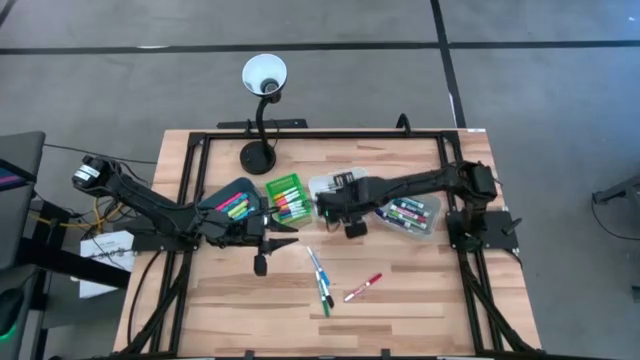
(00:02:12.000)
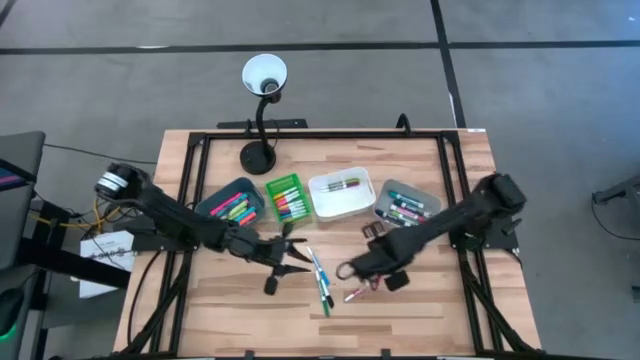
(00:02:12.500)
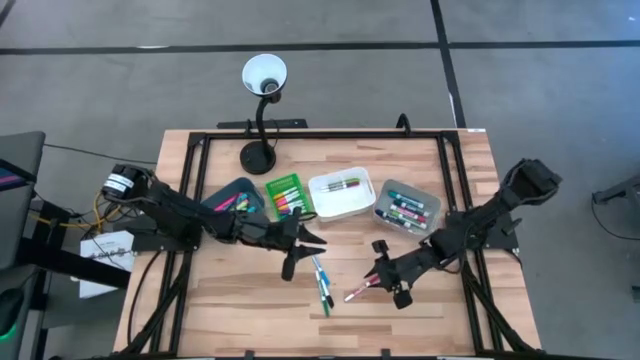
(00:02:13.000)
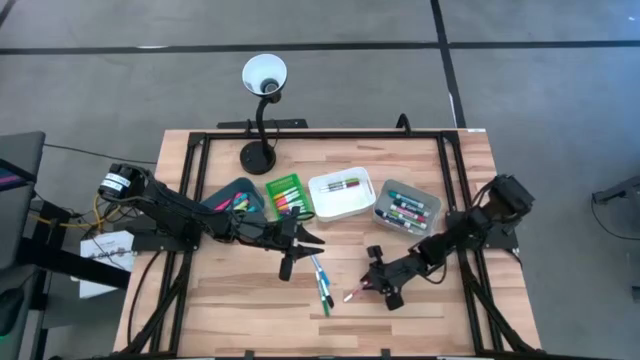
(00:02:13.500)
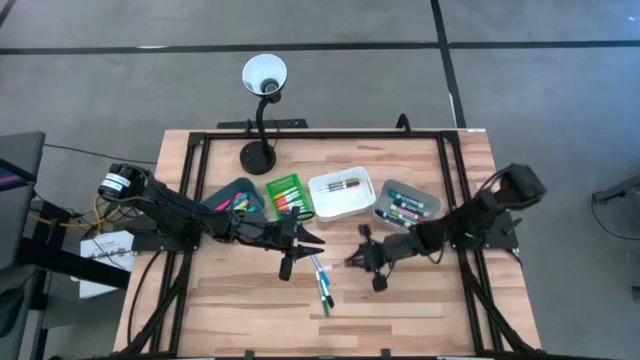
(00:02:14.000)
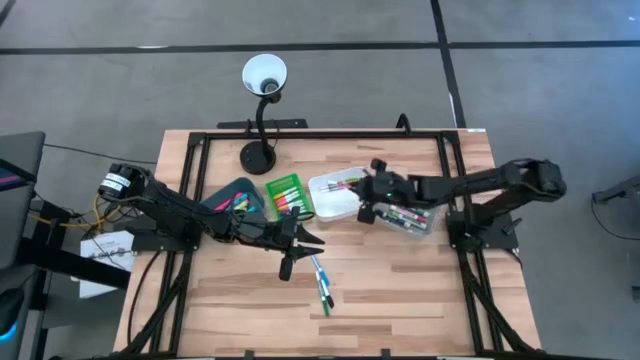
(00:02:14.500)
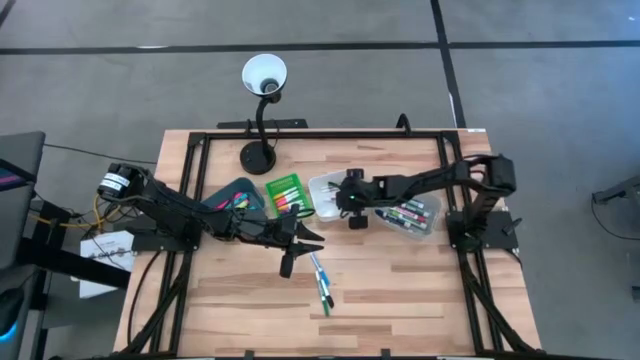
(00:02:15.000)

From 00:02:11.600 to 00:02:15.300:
Task: Pick & Place Markers
Put the red marker pen into the white bin

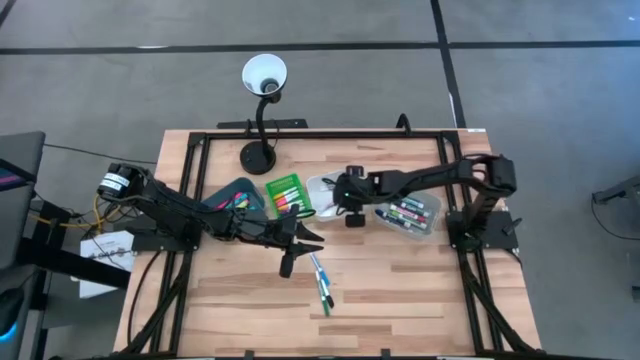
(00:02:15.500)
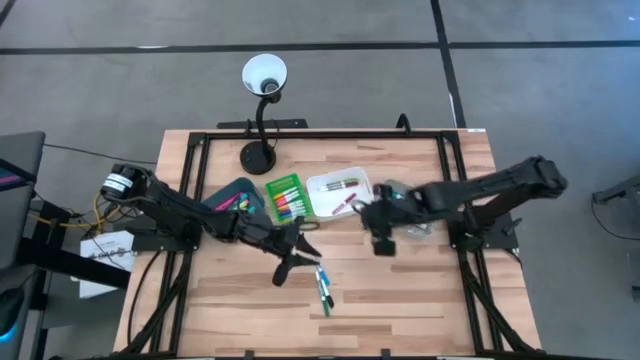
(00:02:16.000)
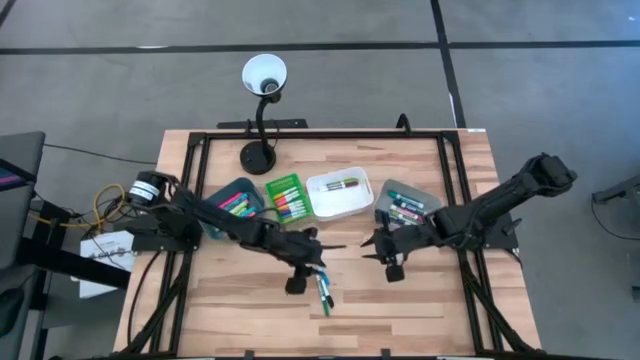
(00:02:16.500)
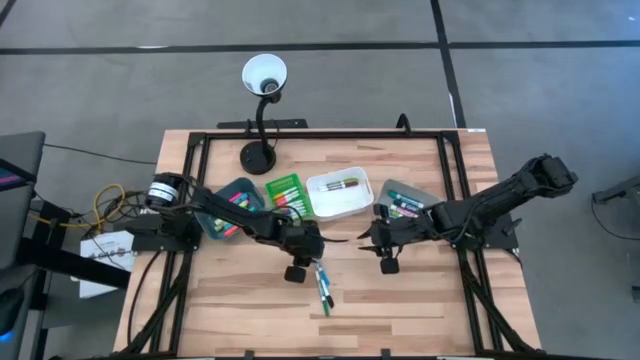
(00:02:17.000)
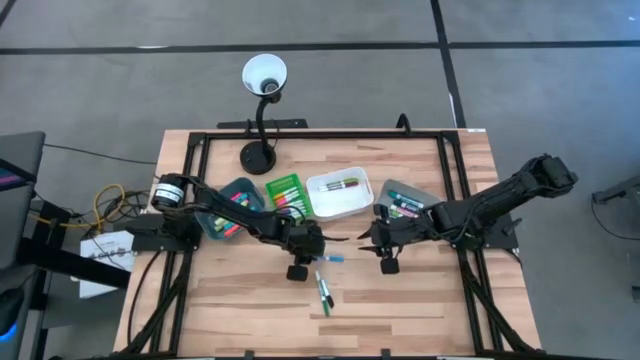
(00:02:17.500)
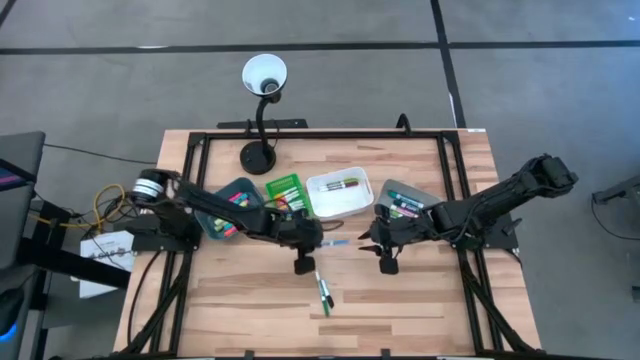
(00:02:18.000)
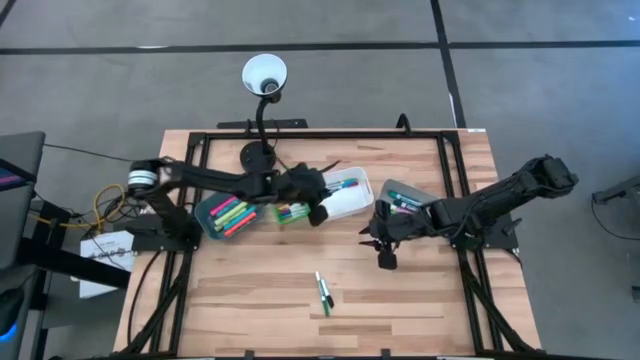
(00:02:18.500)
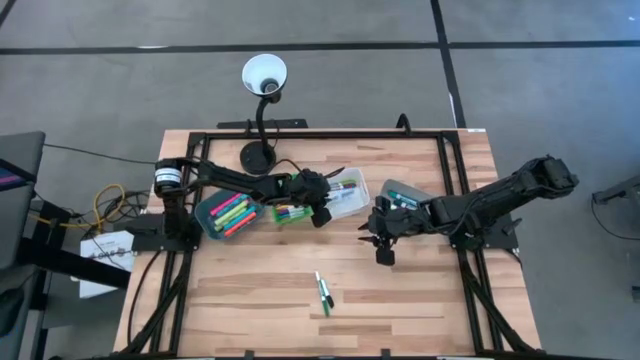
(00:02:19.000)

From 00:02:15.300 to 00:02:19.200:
Put the blue marker pen into the white bin

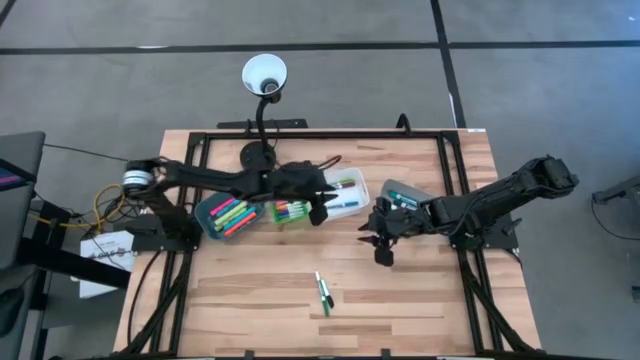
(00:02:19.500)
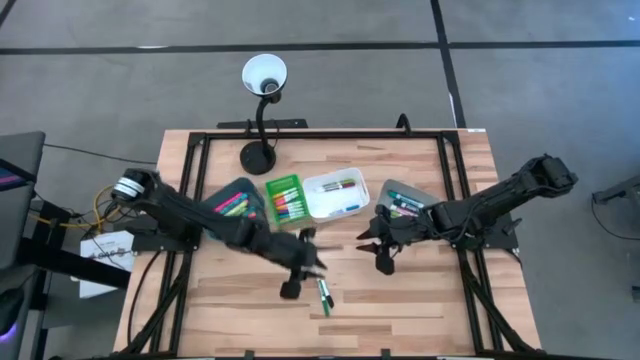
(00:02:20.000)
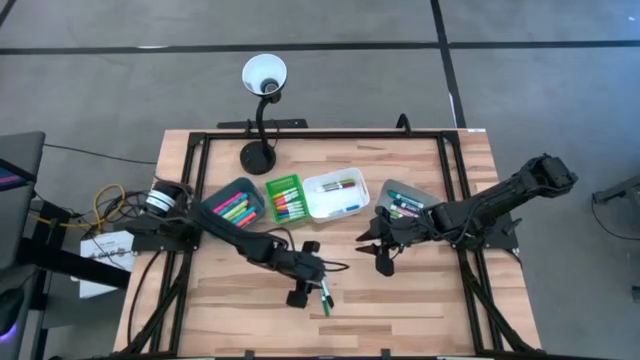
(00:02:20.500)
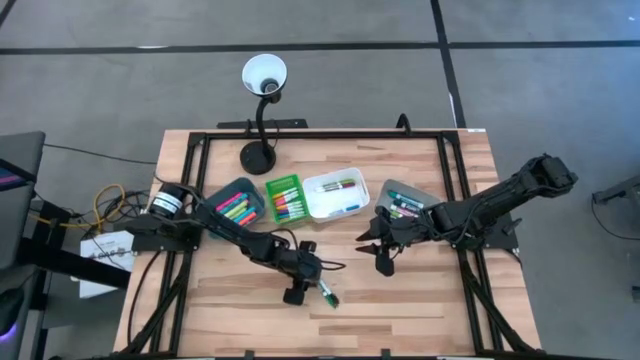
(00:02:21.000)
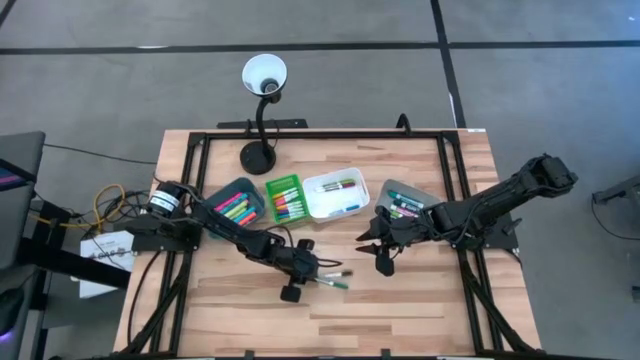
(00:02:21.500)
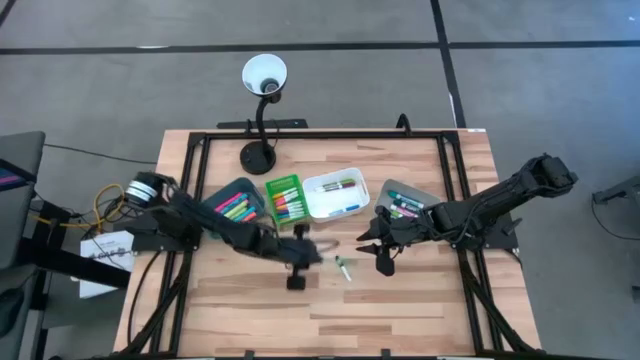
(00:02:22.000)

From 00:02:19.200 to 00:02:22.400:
Put the dark green marker pen into the white bin

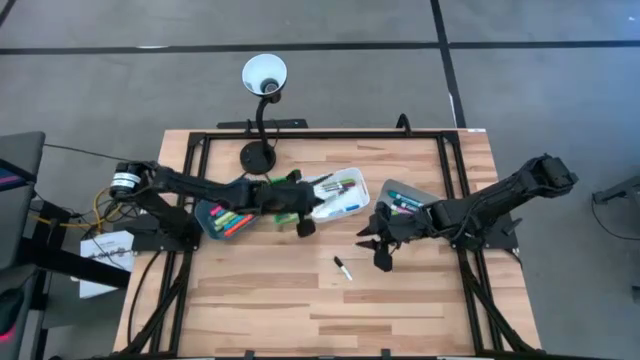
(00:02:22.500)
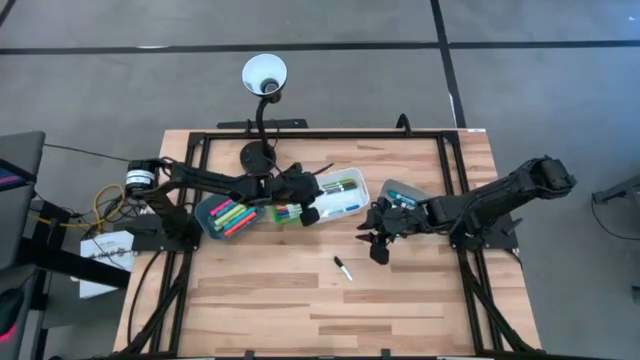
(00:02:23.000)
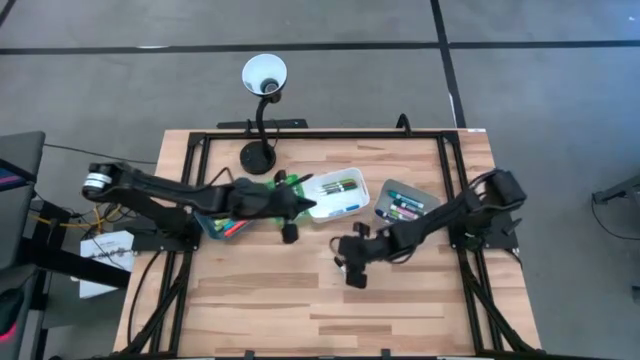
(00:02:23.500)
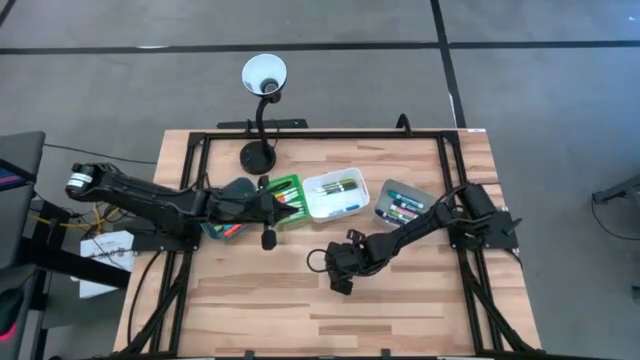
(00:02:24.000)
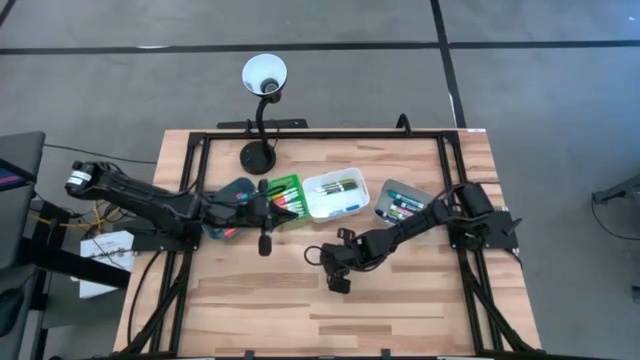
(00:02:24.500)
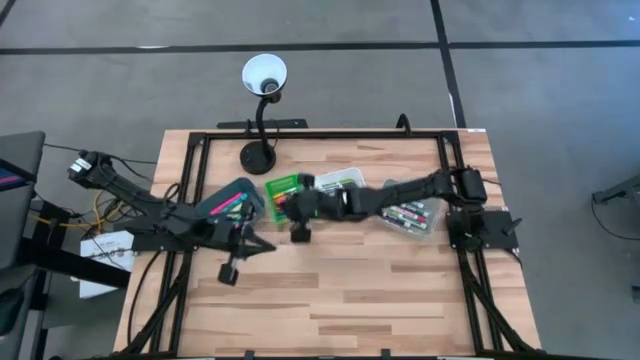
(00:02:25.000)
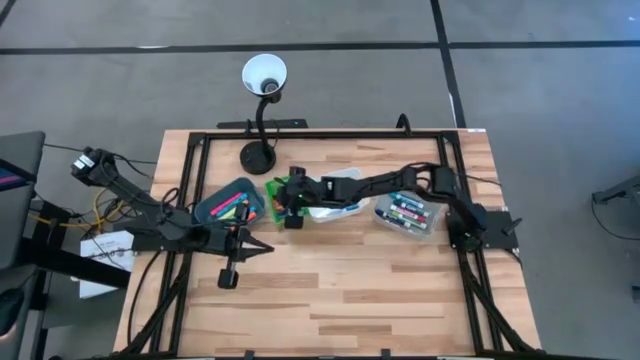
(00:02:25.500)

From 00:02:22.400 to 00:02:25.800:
Put the black and white highlighter pen into the green bin

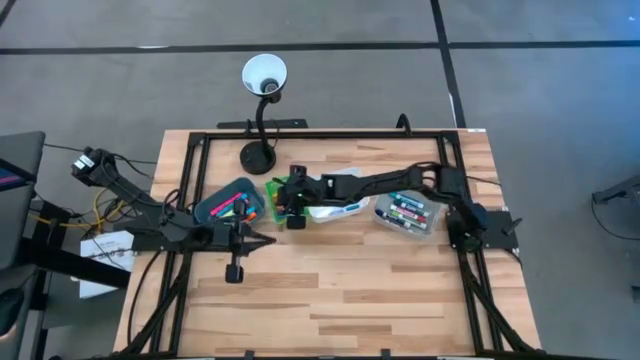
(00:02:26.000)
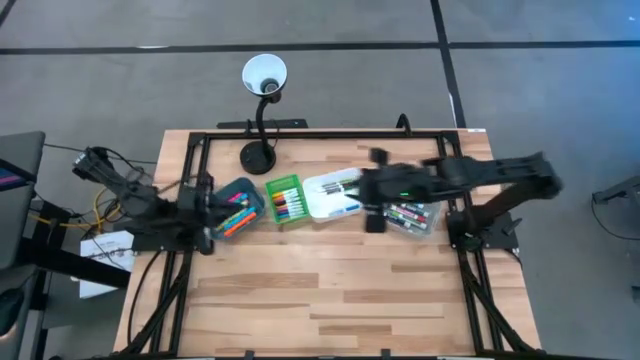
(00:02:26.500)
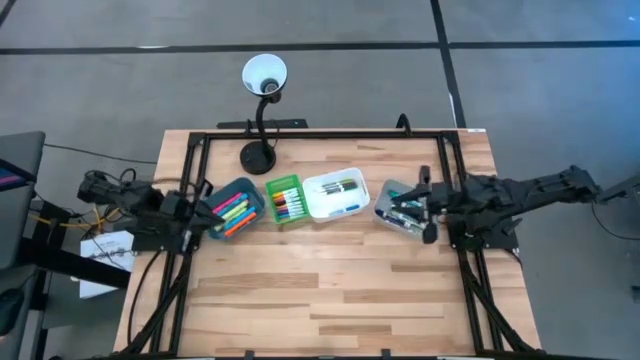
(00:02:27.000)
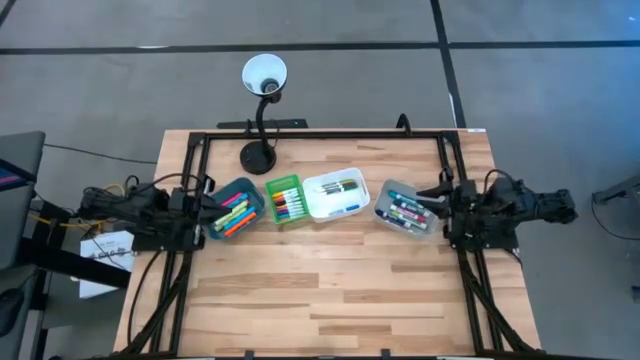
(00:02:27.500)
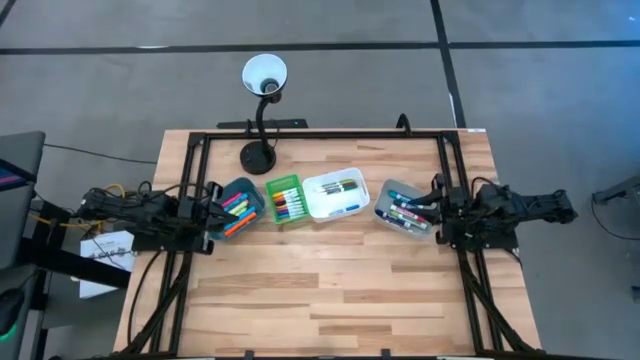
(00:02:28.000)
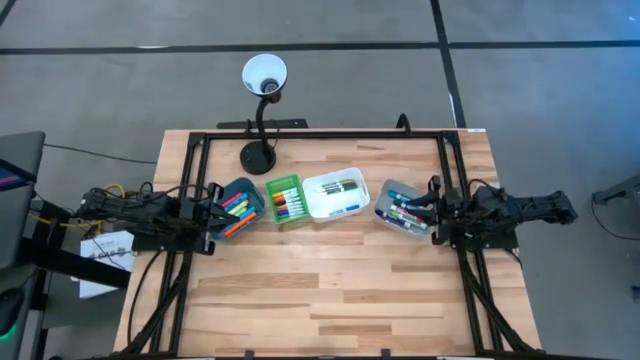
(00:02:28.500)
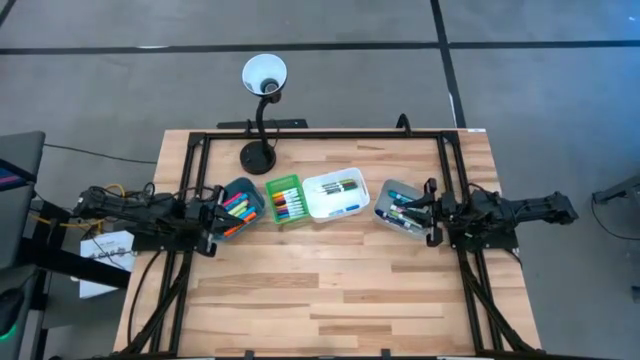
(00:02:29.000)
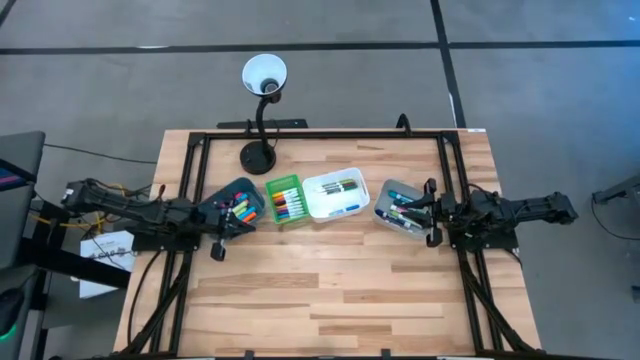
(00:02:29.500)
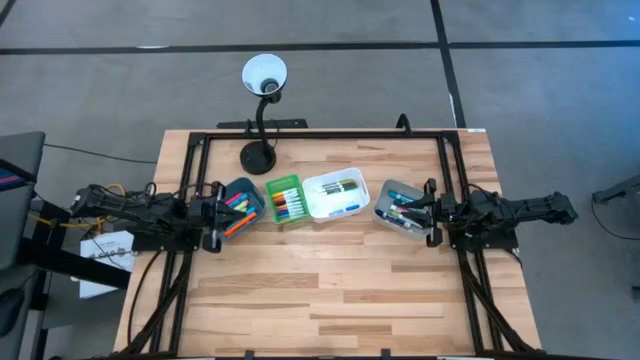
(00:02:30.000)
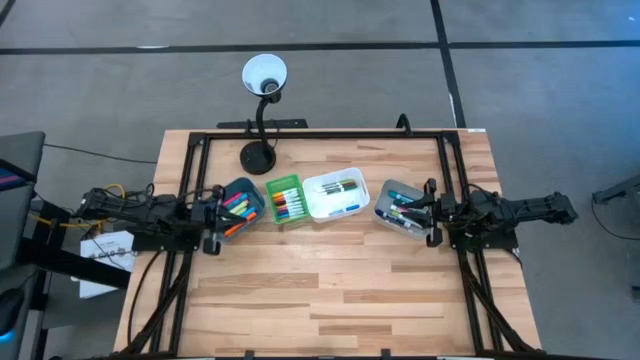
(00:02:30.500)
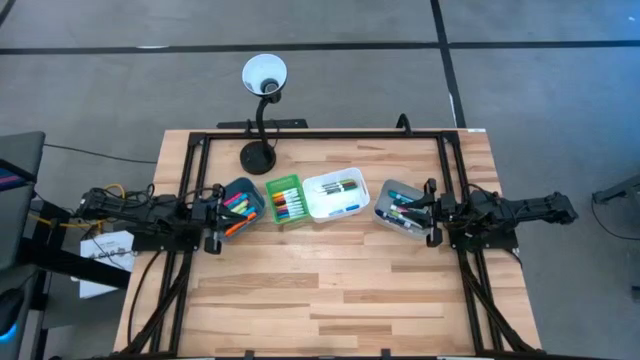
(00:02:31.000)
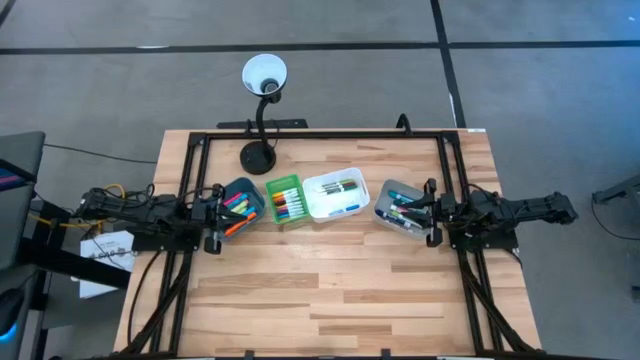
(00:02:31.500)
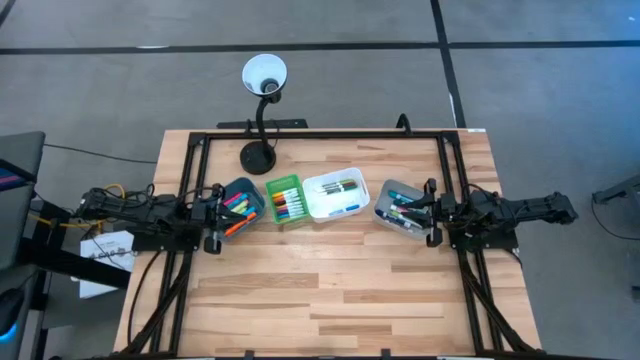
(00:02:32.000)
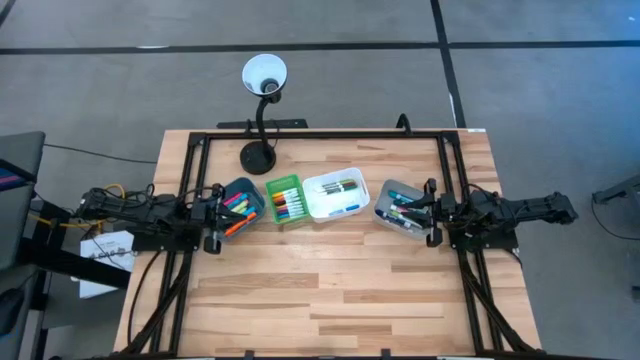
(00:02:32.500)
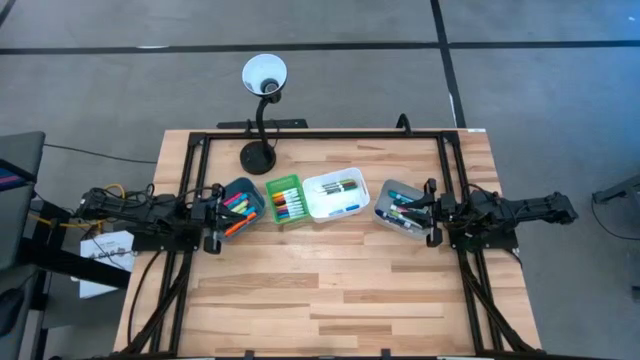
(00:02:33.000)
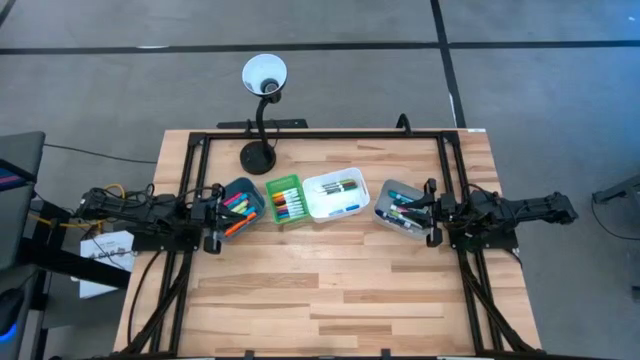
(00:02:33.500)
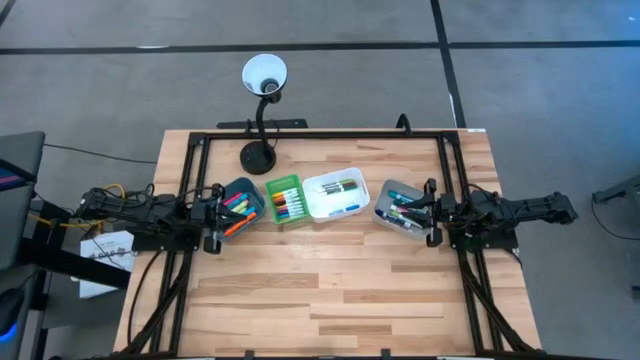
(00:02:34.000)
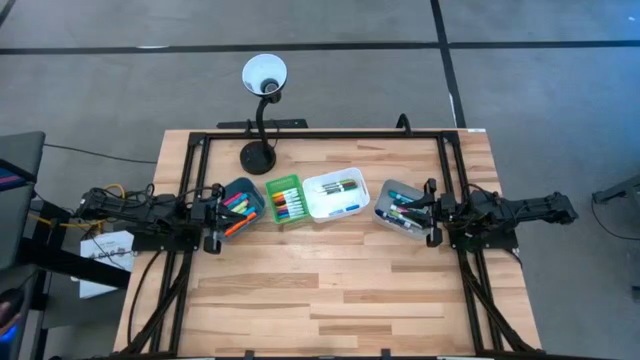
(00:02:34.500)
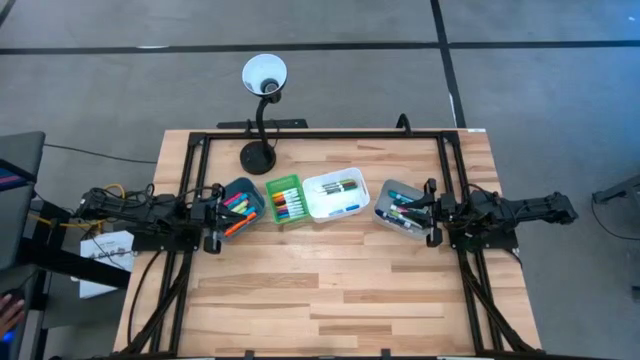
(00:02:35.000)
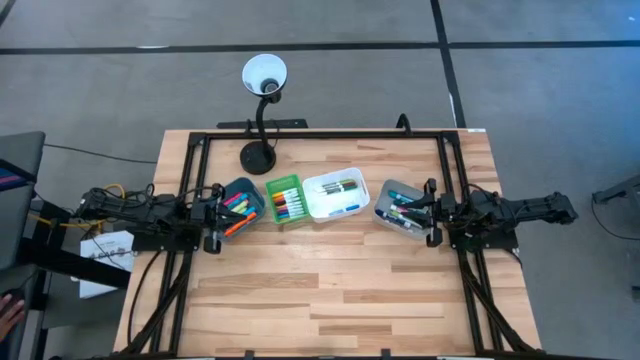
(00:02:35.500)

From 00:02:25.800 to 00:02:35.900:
Return to Home Position
